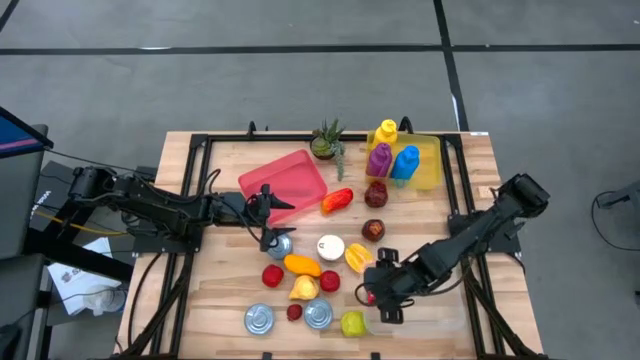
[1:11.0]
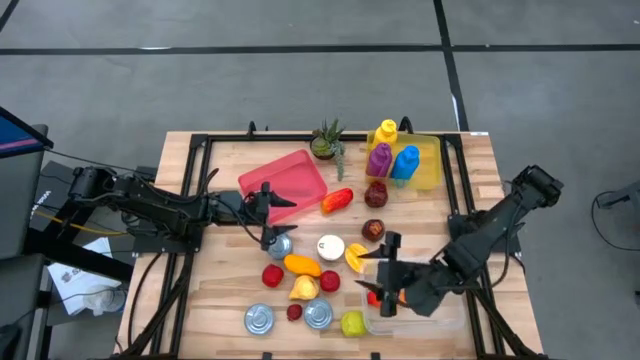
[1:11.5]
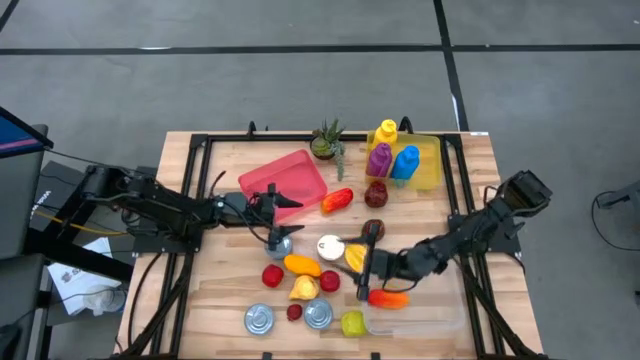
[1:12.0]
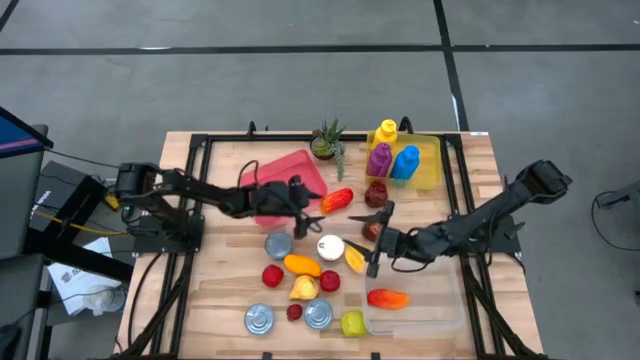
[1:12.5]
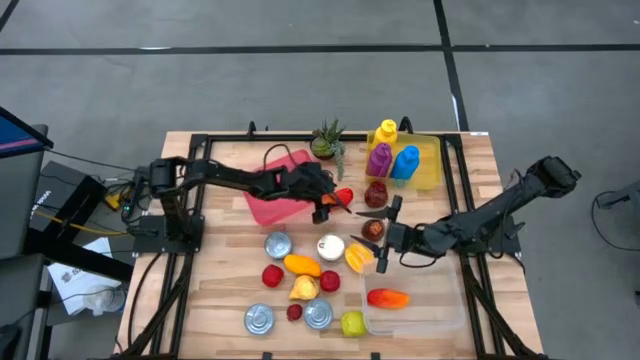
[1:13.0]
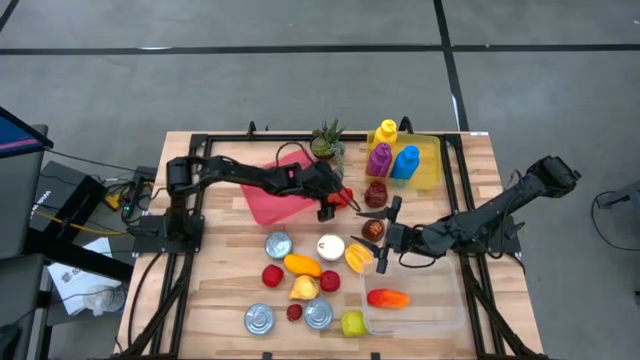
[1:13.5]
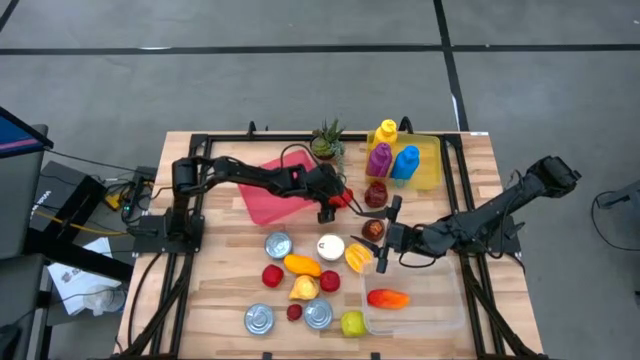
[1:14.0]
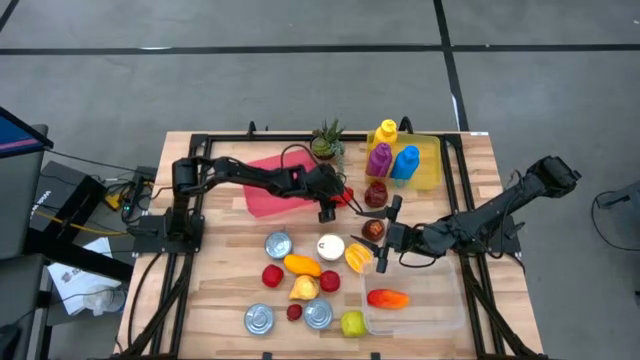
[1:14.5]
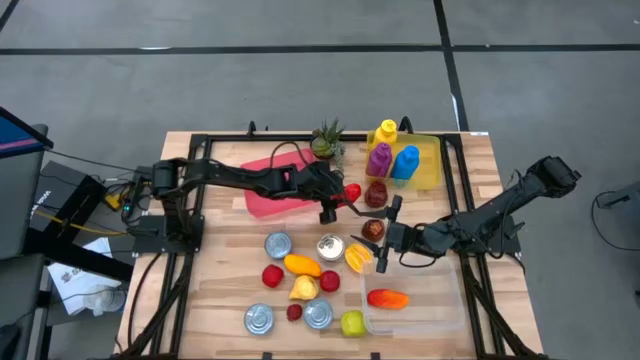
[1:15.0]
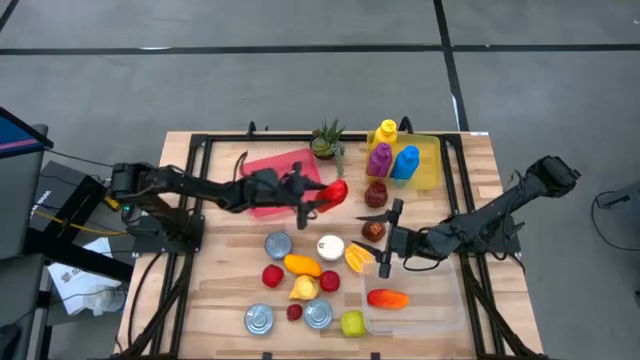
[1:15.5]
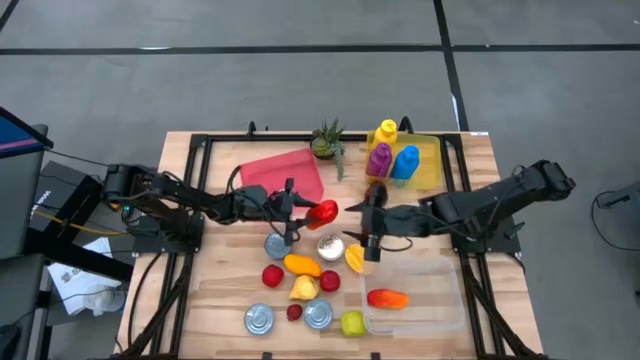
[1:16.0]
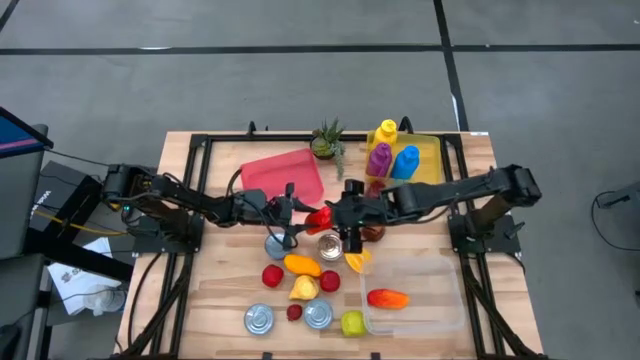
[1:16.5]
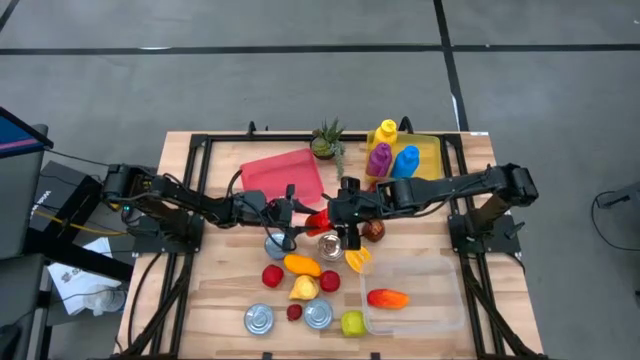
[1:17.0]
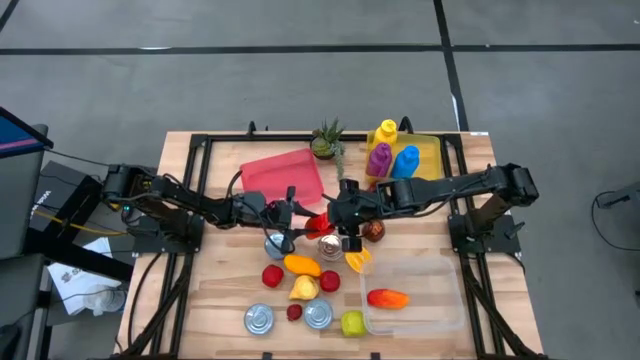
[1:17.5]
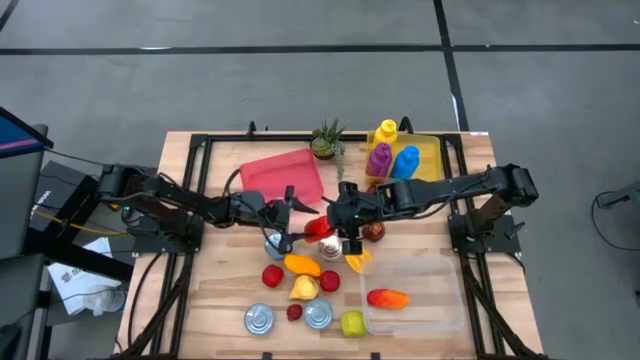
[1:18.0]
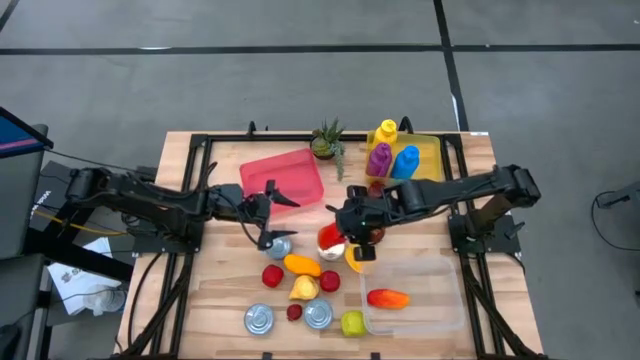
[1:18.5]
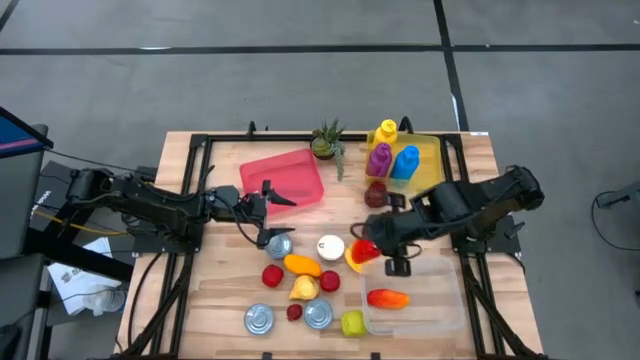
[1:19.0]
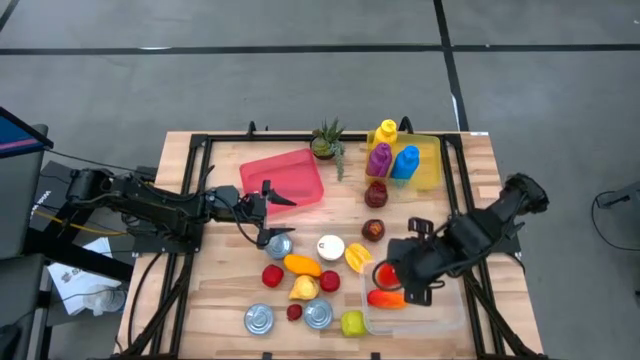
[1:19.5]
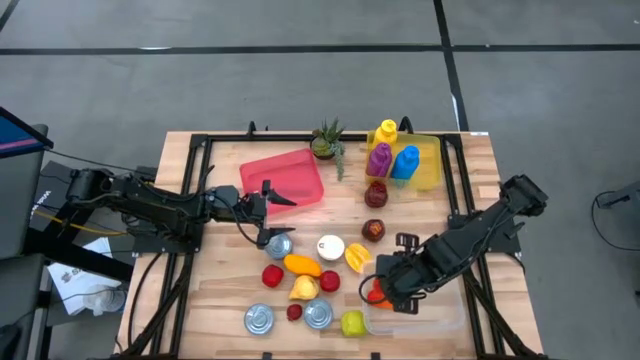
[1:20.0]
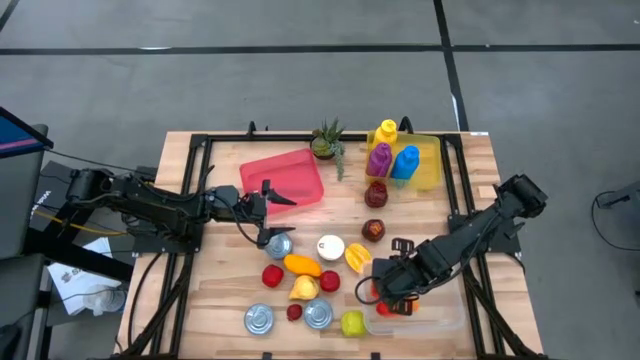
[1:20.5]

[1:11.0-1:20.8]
Task: Pick & Place Food Item
Put the red mango into the transparent bin

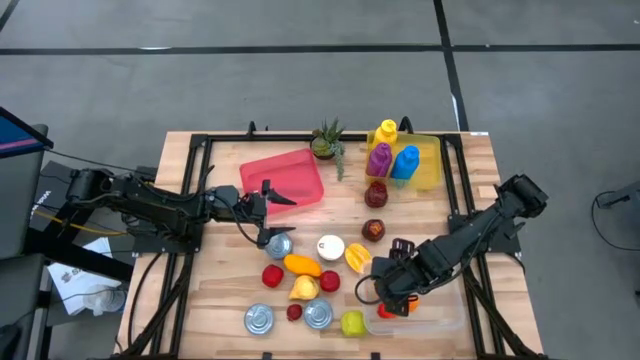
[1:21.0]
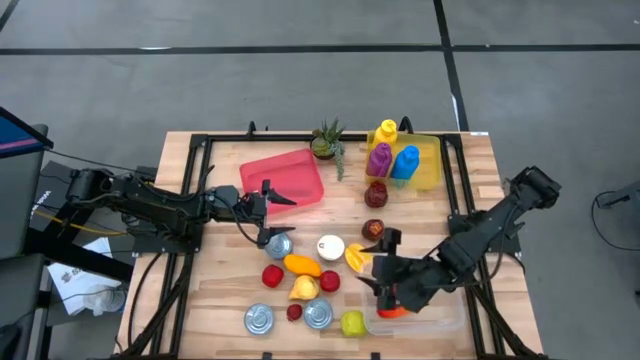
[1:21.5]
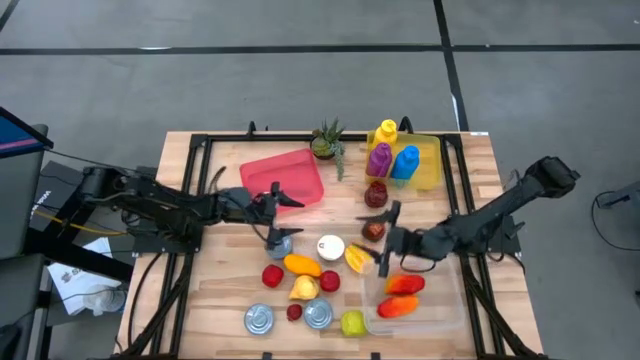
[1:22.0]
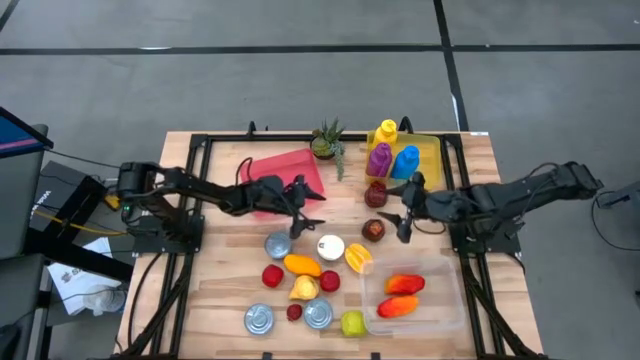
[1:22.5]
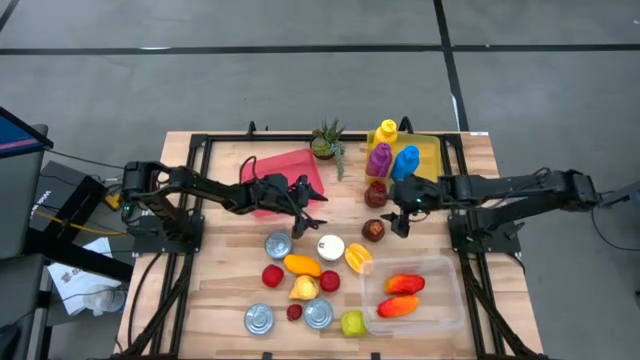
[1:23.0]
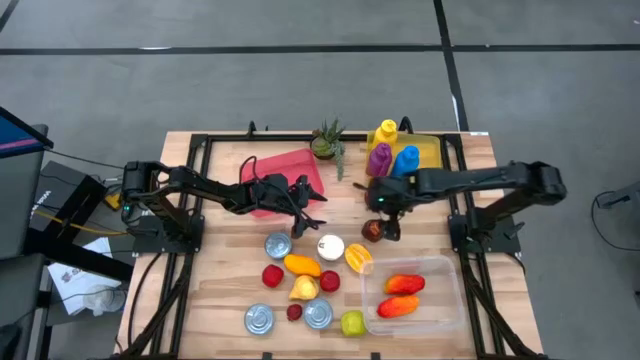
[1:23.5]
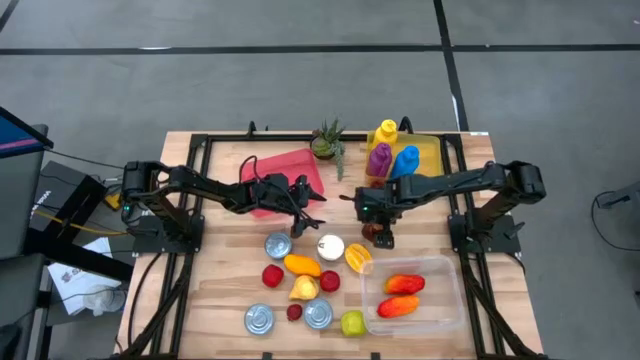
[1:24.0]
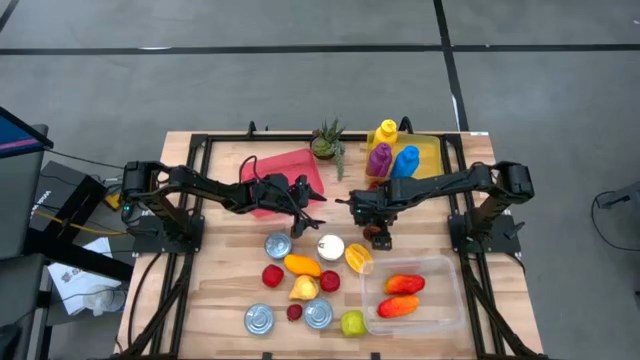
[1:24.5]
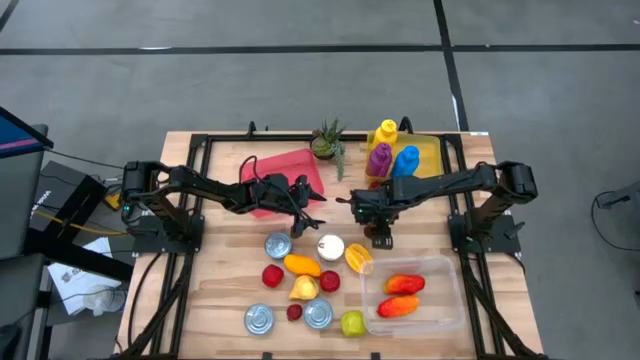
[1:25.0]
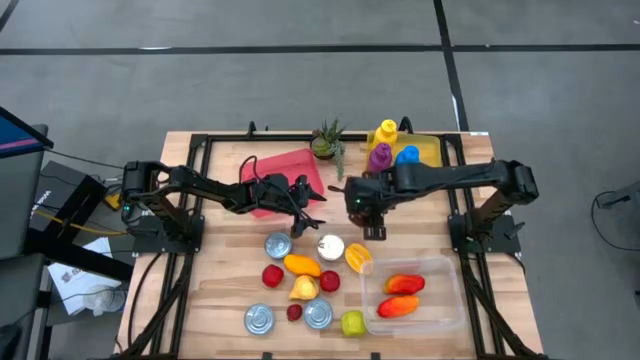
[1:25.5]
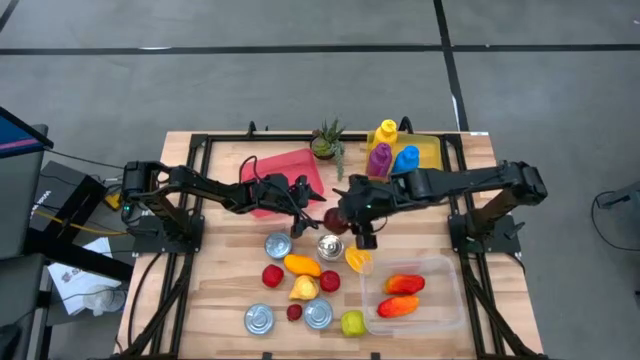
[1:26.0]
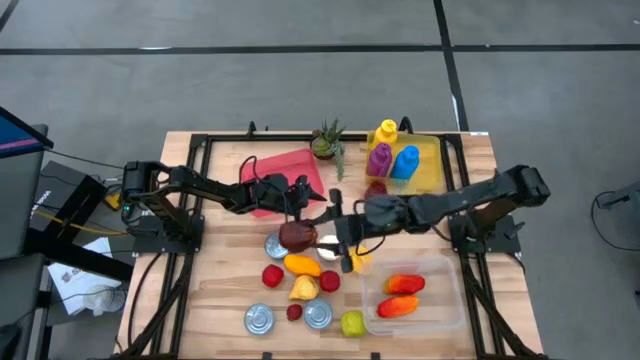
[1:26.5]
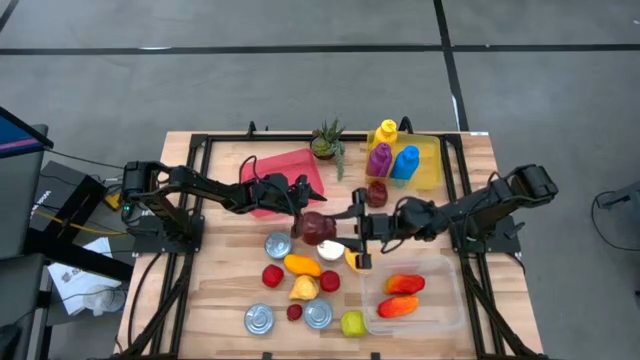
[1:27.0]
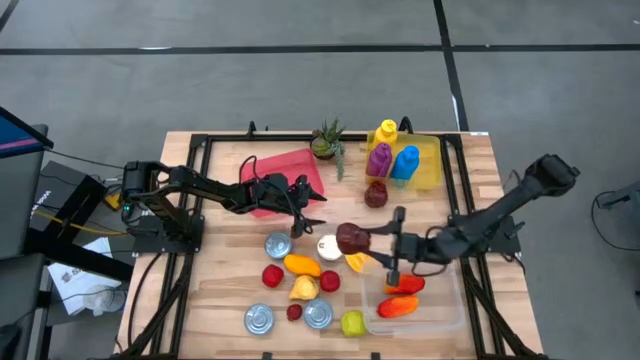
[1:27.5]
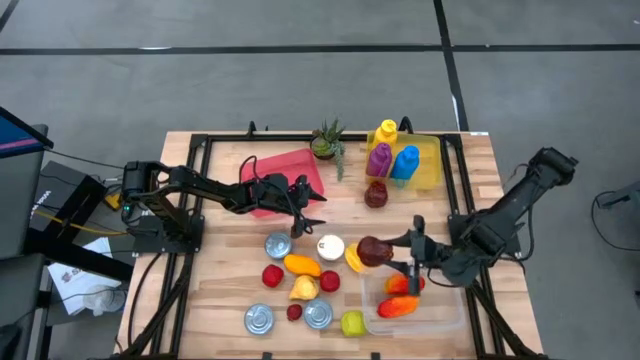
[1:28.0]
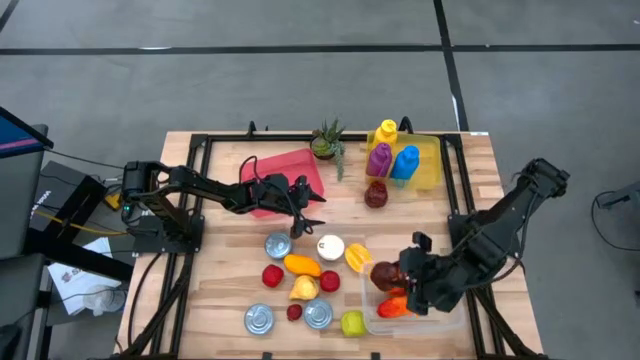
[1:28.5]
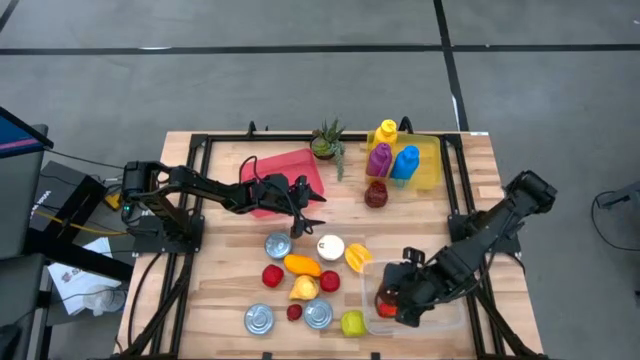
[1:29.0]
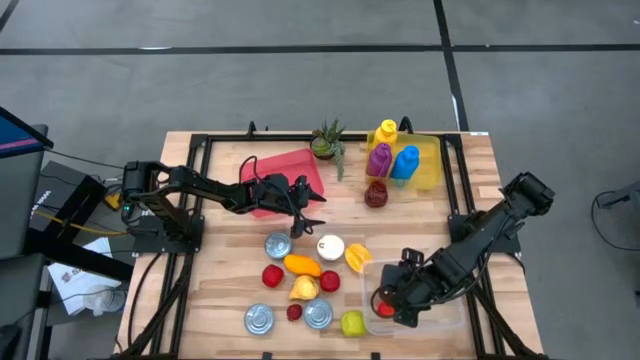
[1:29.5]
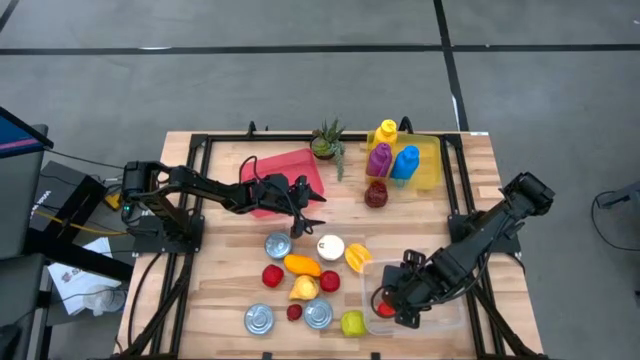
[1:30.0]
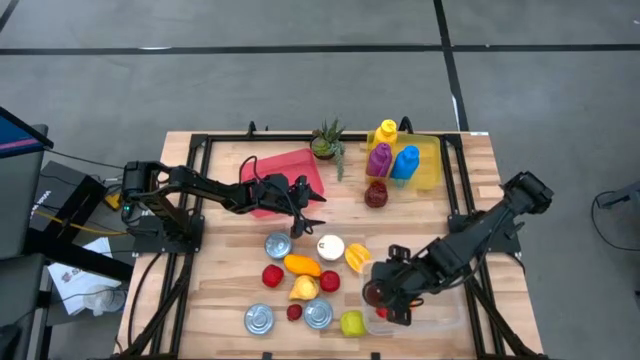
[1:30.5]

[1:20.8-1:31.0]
Put the bottom red apple into the transparent bin
